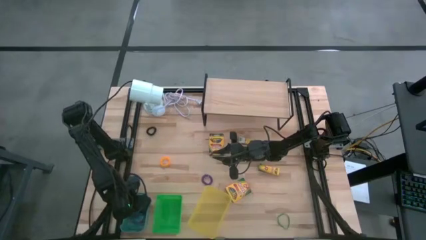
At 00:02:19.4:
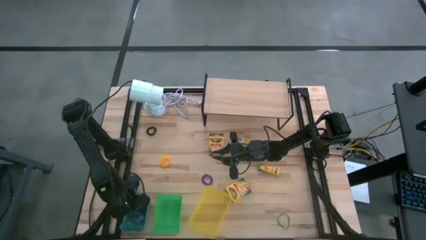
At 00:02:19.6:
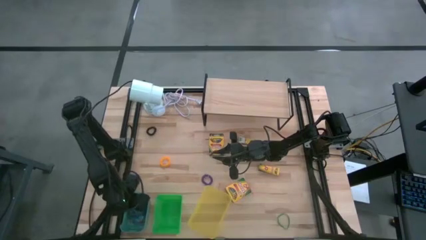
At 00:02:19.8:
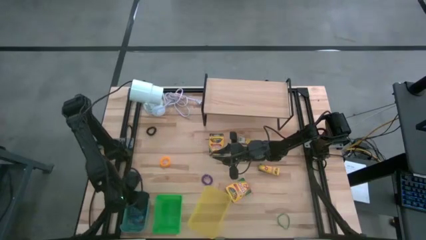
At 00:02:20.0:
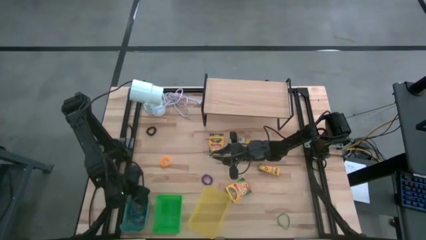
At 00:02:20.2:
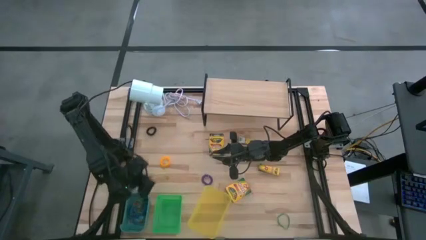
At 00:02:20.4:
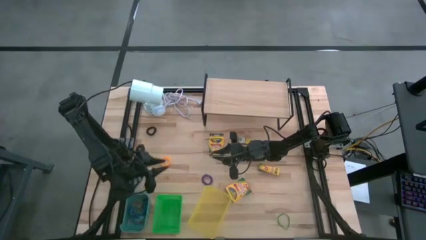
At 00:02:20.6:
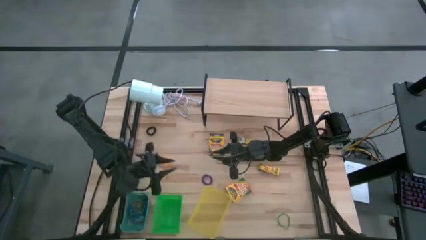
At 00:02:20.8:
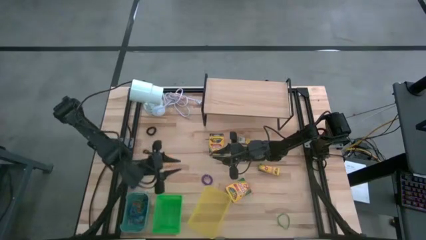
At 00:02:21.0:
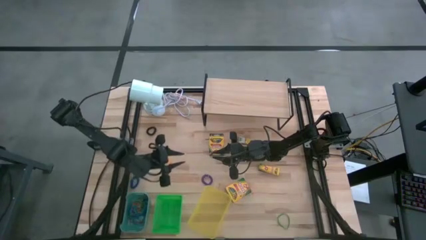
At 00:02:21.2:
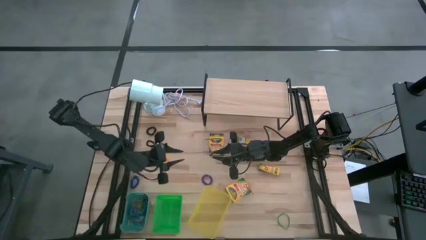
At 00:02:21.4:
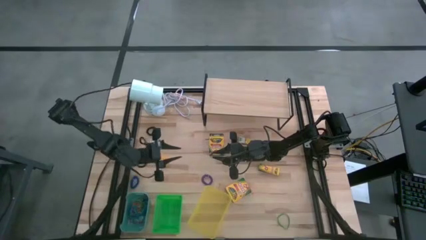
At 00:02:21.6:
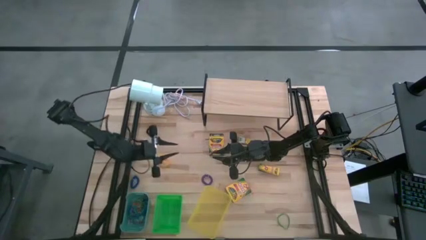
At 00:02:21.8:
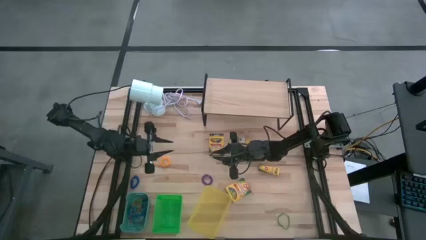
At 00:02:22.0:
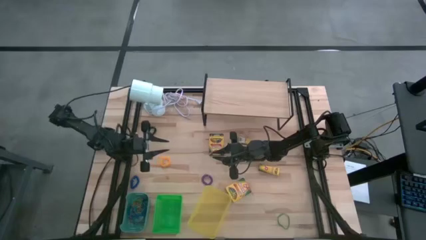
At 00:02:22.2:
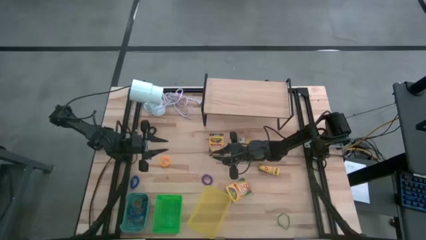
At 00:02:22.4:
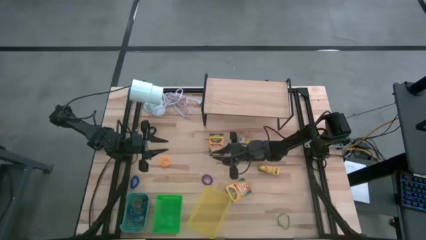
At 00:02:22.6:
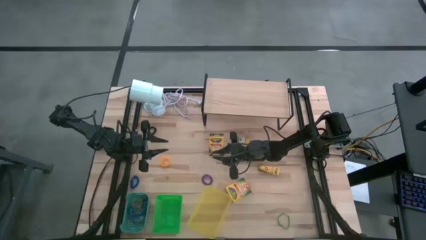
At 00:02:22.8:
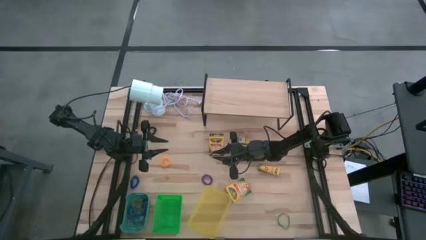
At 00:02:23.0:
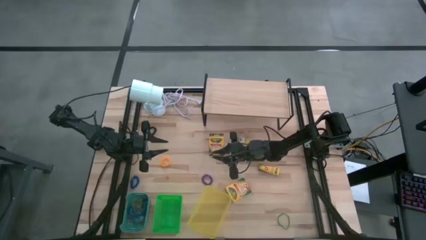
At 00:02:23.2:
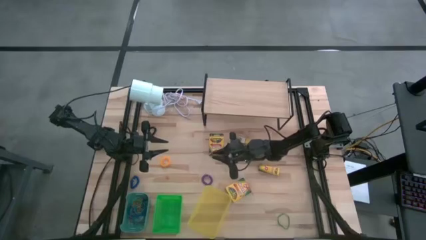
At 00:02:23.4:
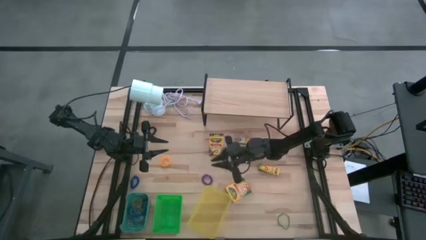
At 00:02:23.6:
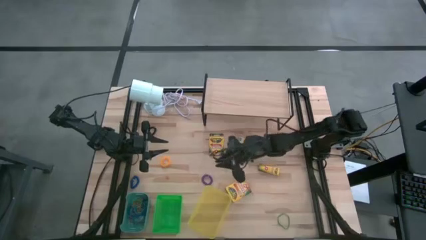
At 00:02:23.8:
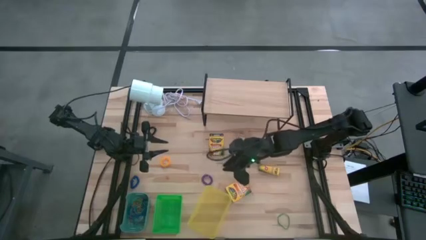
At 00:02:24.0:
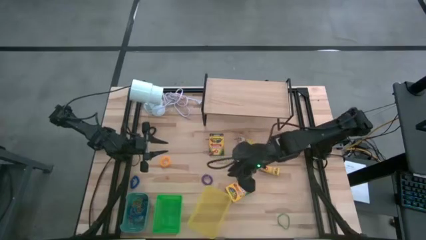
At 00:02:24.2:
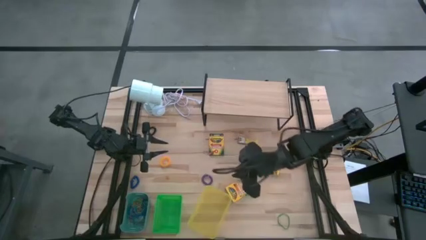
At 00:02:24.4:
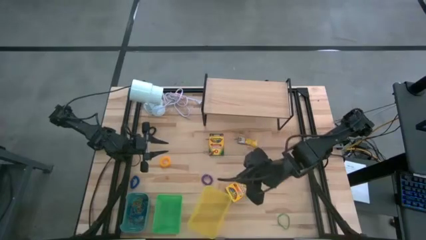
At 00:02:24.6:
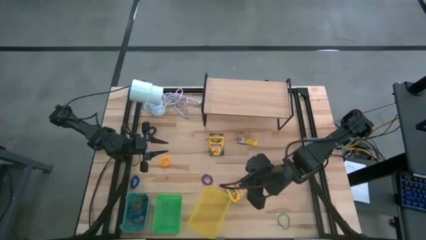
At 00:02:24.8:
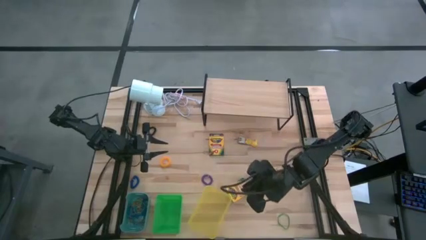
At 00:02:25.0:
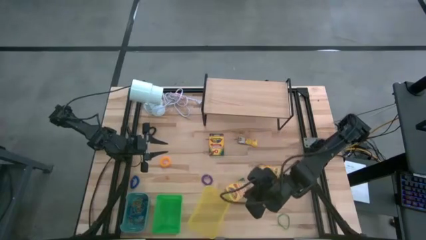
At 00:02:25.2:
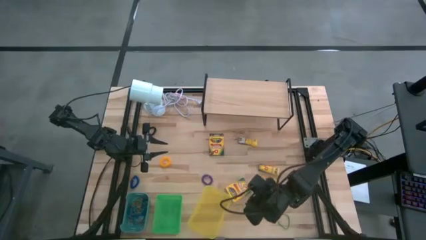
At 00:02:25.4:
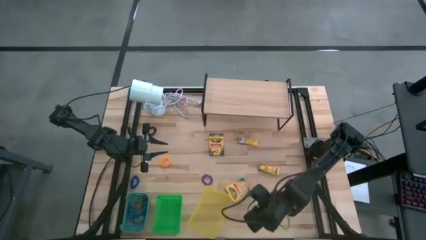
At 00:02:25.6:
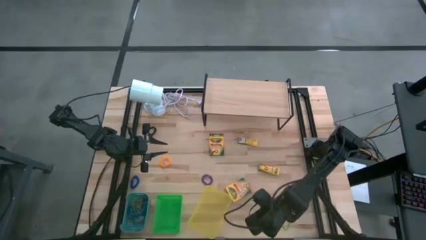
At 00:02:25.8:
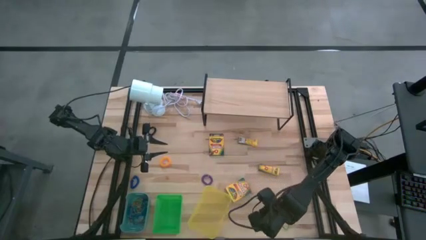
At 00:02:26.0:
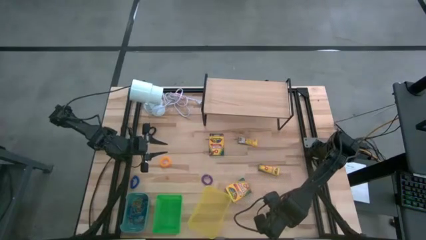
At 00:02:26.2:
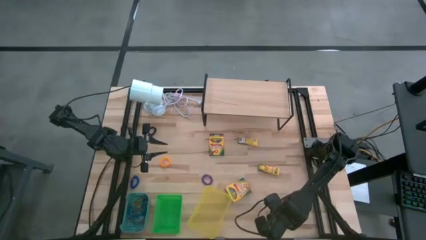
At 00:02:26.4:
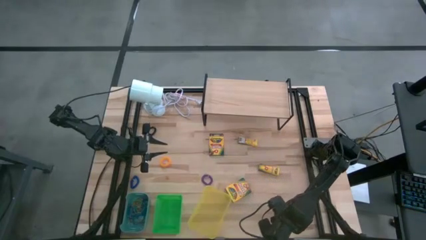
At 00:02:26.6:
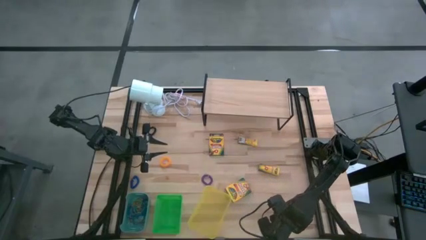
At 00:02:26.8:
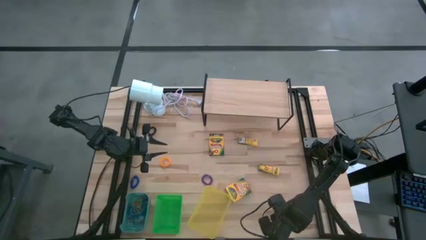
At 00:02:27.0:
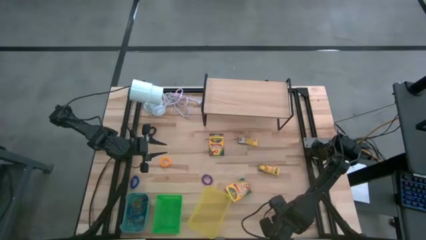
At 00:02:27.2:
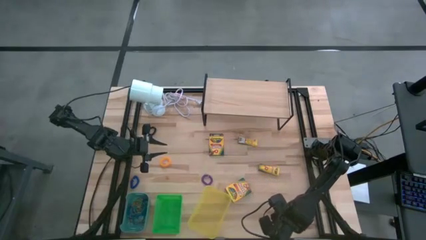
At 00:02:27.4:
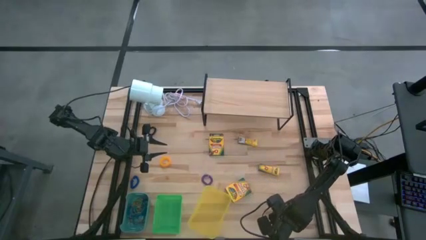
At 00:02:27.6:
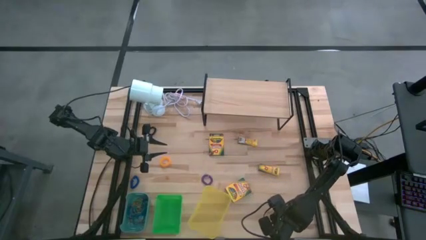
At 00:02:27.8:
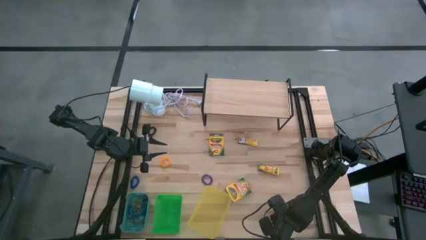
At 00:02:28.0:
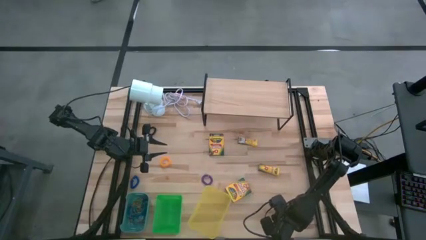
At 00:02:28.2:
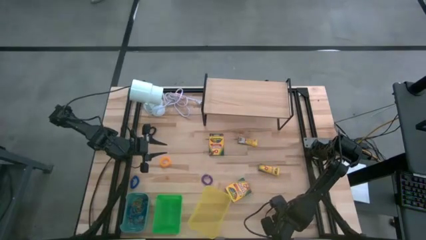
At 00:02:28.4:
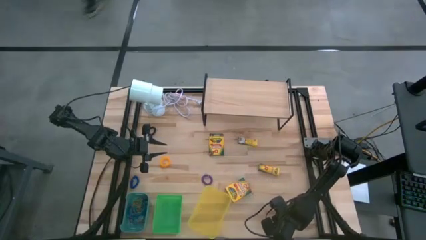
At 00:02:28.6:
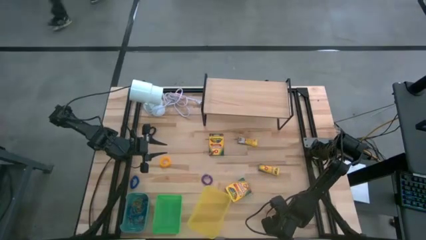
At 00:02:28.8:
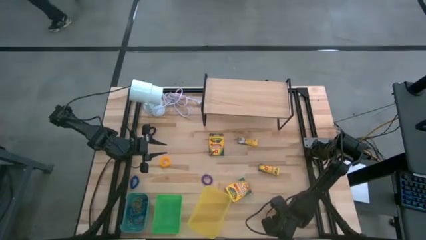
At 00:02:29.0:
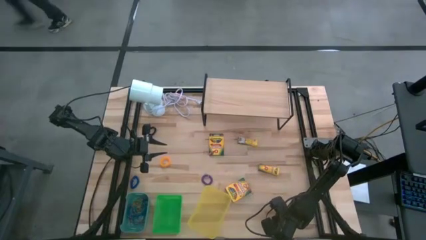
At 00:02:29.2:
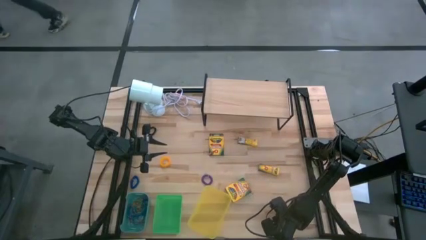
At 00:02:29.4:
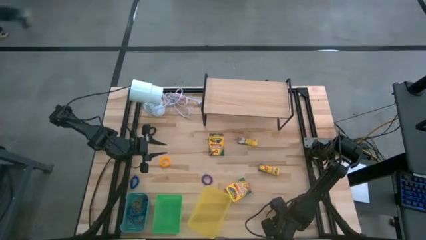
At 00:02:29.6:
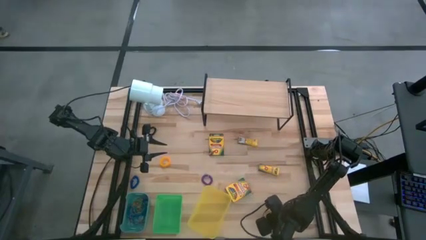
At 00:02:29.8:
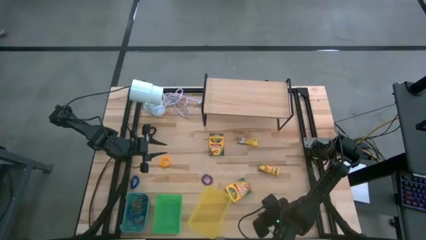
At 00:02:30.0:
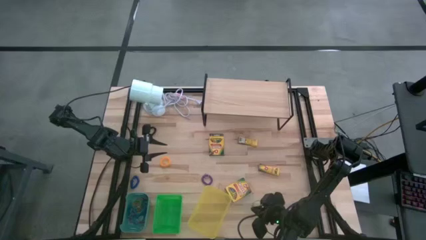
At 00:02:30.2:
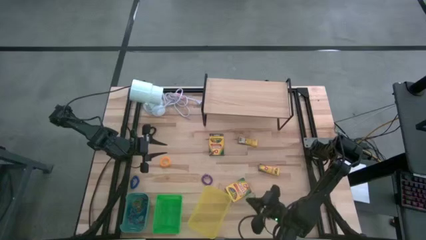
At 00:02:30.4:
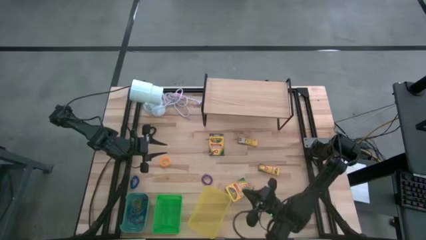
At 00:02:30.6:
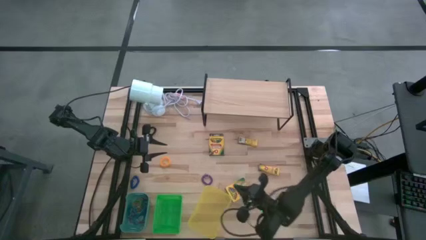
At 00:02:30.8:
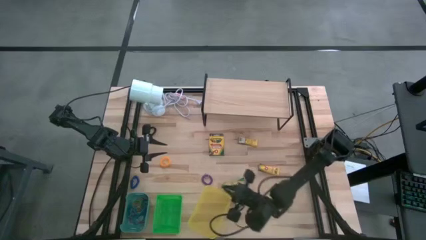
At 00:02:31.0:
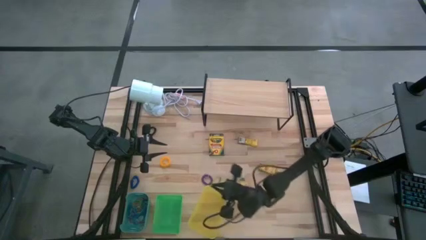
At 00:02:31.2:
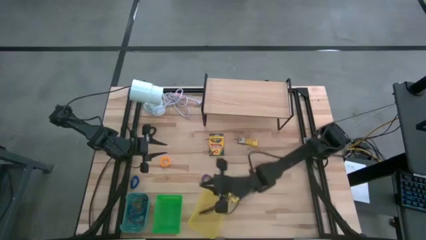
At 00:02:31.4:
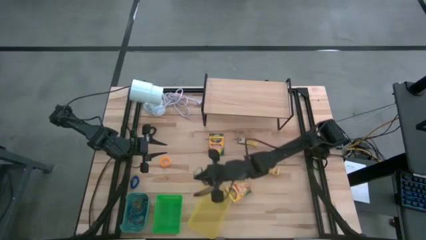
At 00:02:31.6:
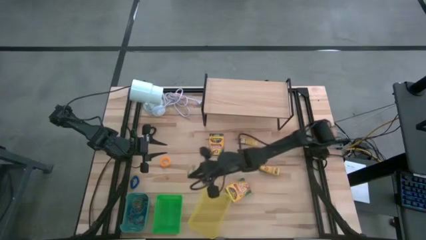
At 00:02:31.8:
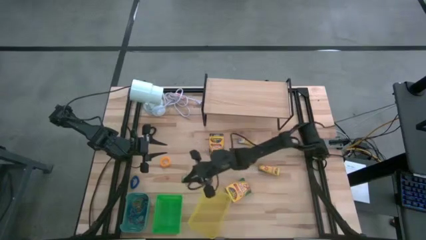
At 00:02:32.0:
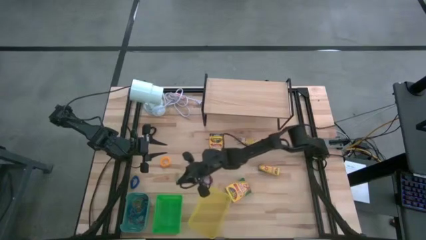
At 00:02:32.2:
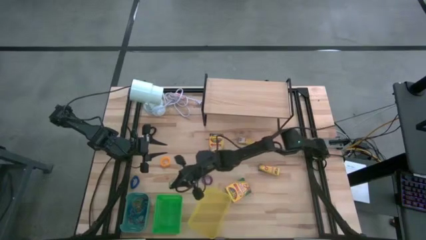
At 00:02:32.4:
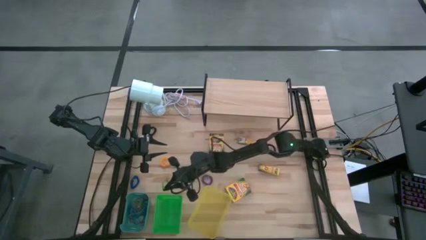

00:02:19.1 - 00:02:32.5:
Task: Pick & Place Office Desk Supplies
Put the green rubberband into the blue bin
